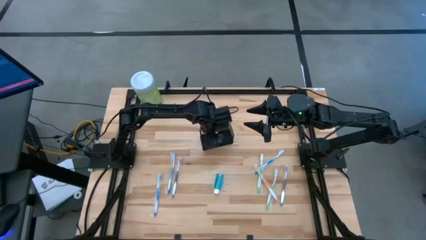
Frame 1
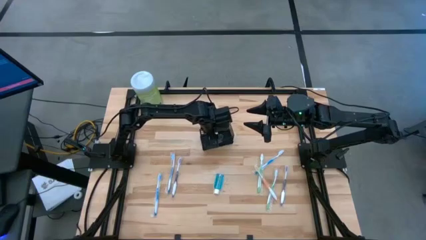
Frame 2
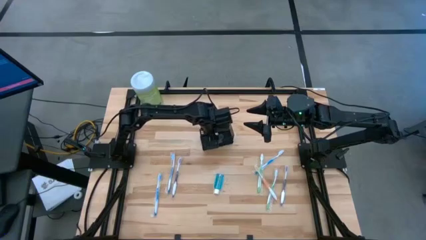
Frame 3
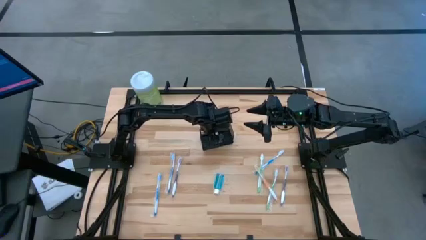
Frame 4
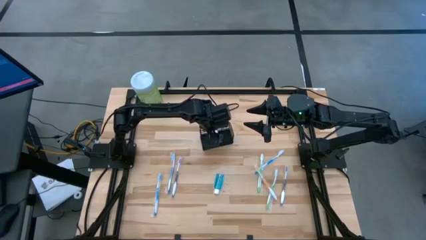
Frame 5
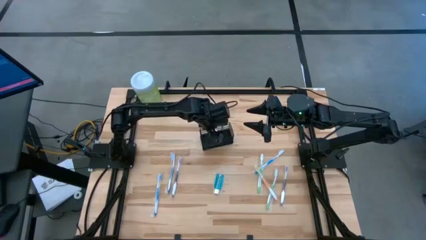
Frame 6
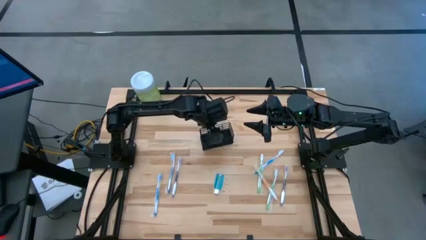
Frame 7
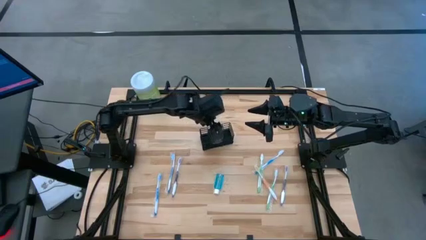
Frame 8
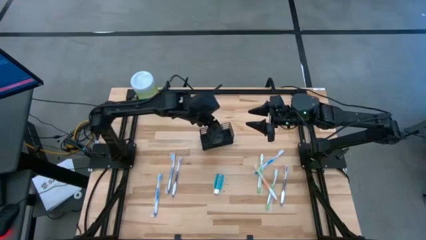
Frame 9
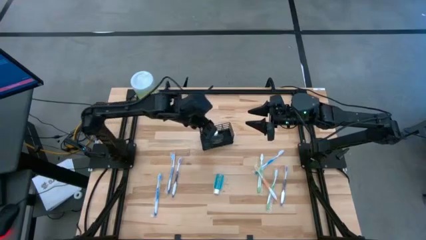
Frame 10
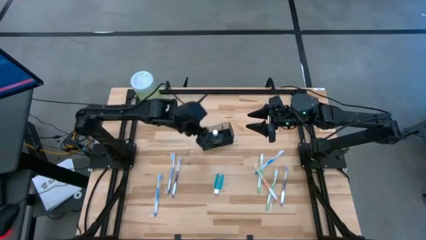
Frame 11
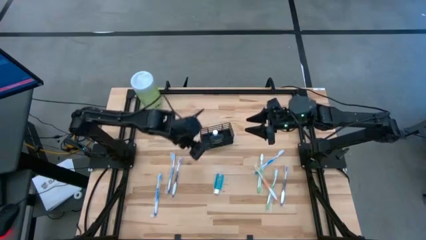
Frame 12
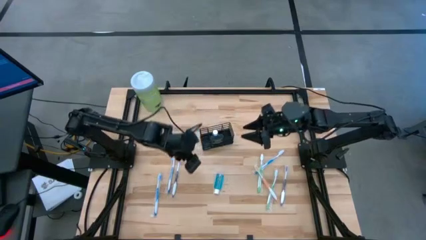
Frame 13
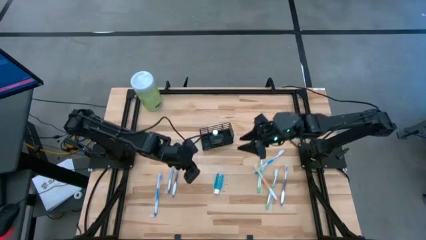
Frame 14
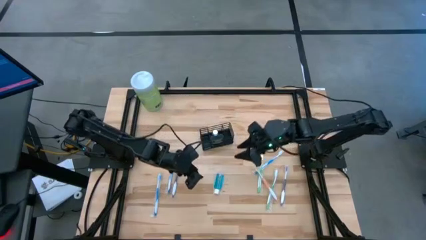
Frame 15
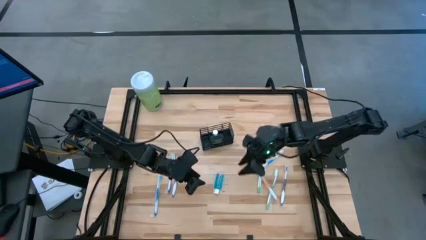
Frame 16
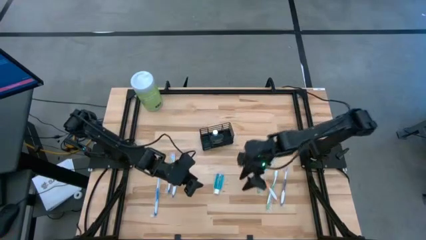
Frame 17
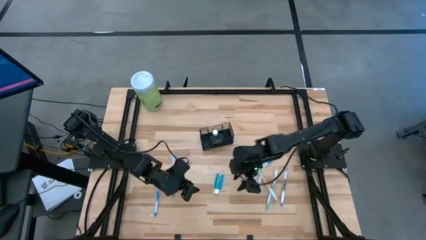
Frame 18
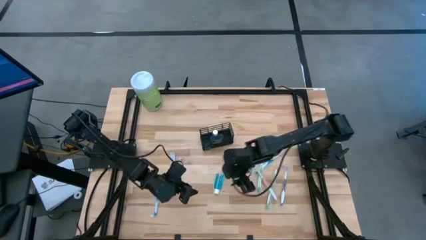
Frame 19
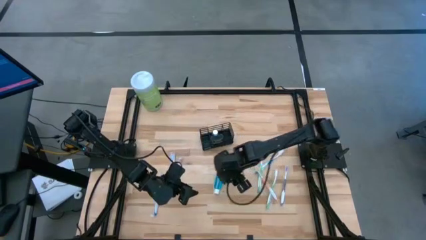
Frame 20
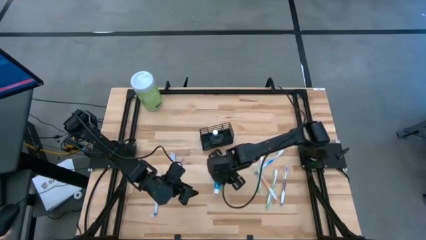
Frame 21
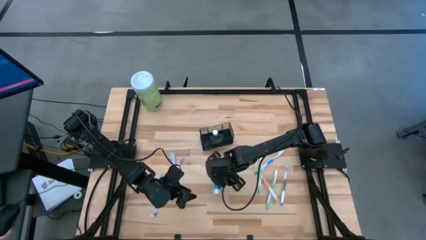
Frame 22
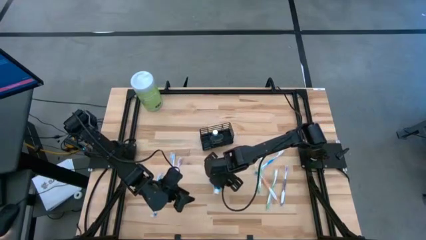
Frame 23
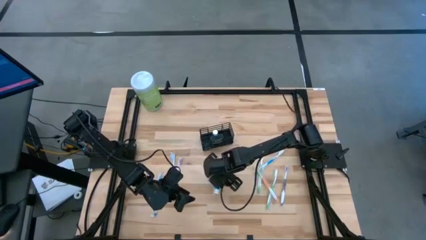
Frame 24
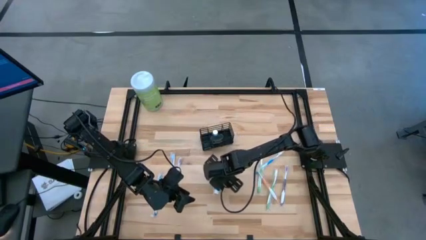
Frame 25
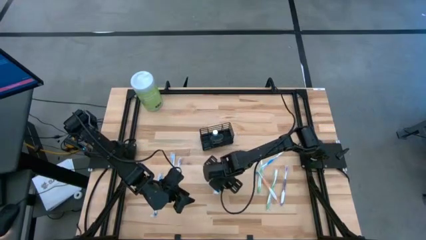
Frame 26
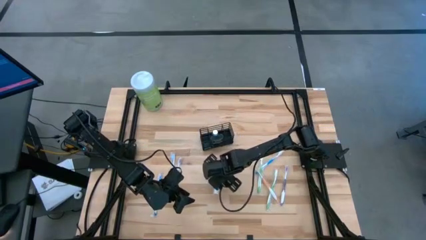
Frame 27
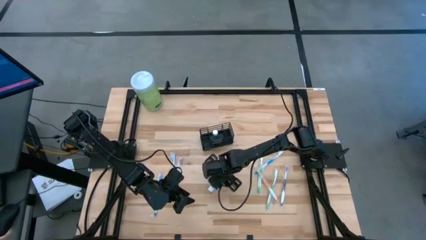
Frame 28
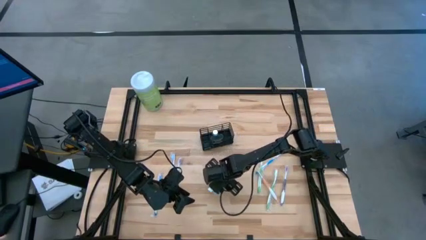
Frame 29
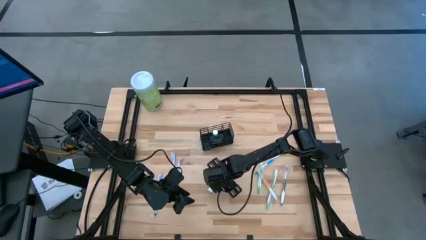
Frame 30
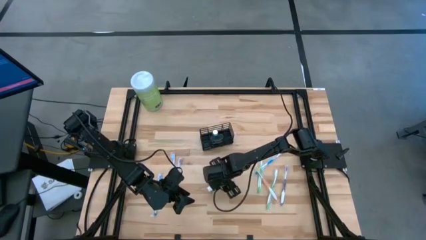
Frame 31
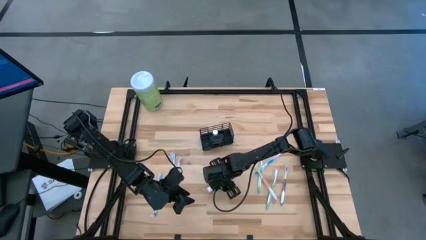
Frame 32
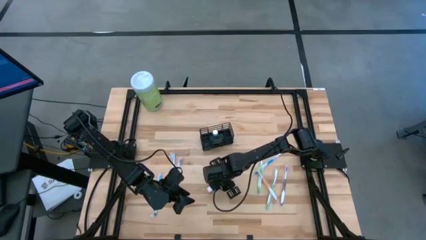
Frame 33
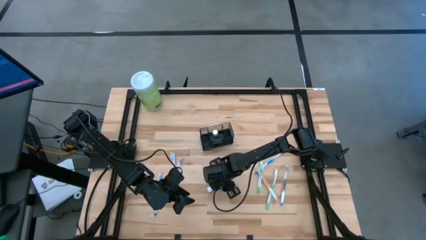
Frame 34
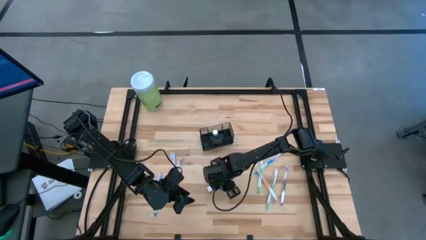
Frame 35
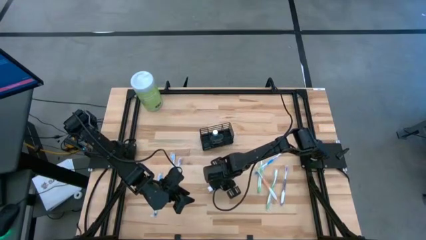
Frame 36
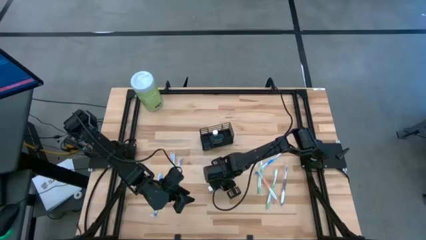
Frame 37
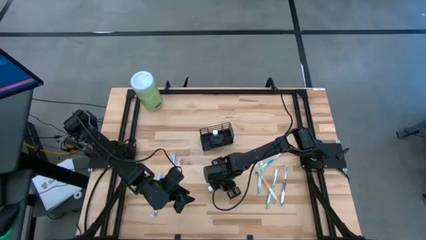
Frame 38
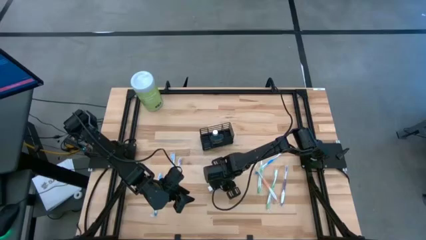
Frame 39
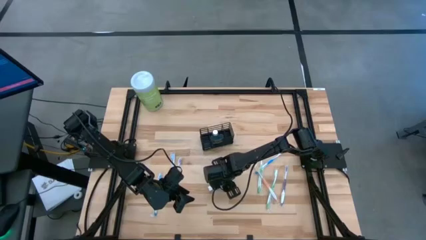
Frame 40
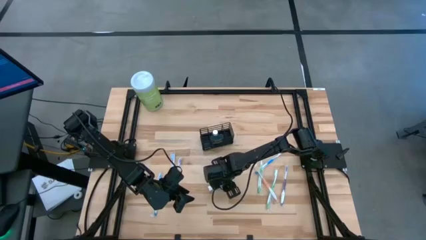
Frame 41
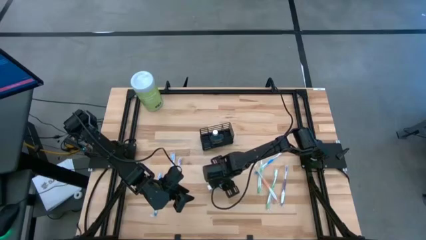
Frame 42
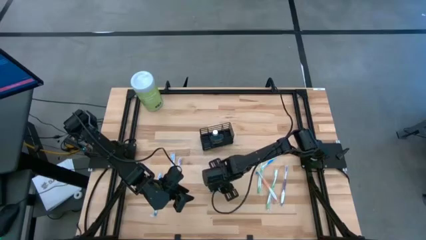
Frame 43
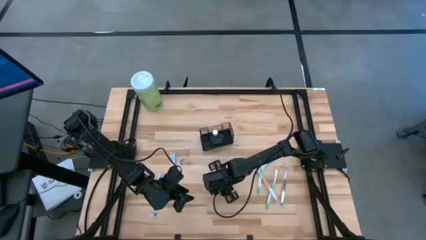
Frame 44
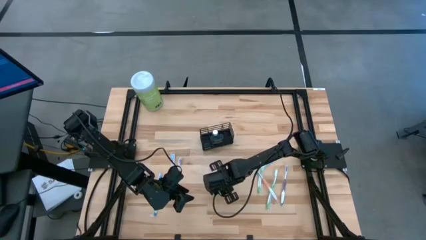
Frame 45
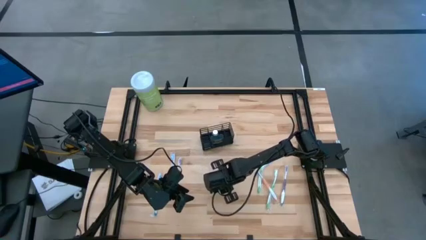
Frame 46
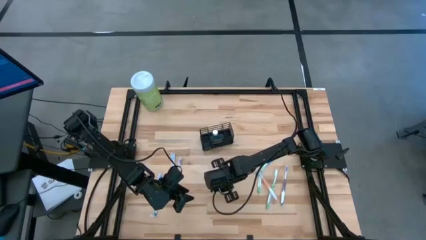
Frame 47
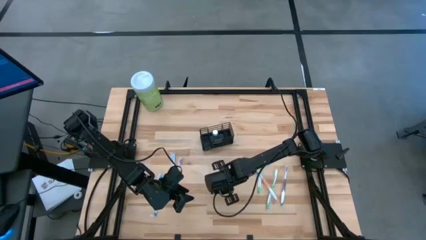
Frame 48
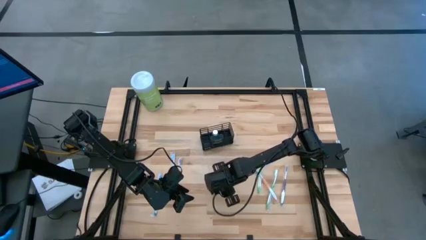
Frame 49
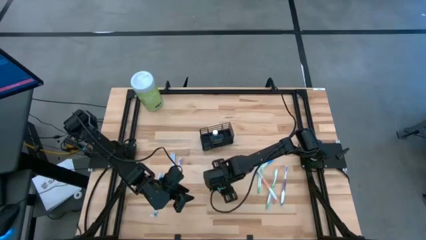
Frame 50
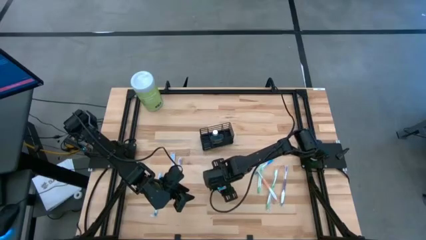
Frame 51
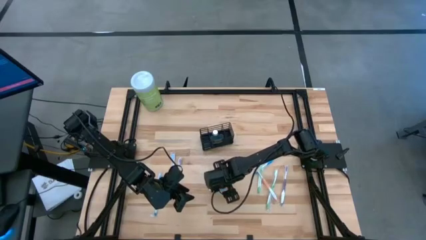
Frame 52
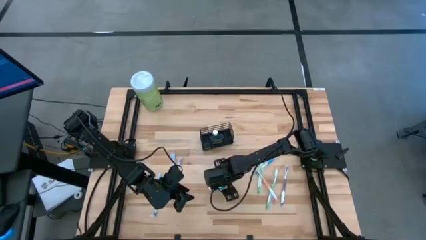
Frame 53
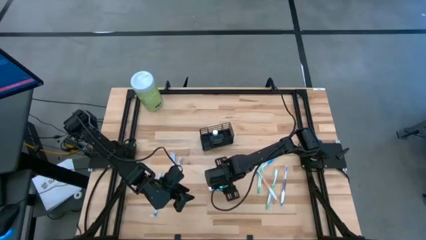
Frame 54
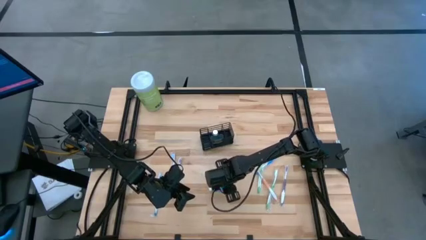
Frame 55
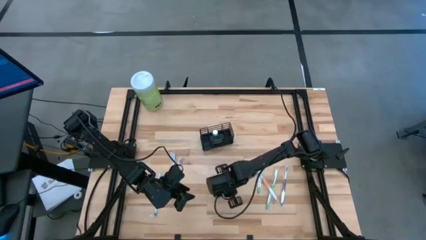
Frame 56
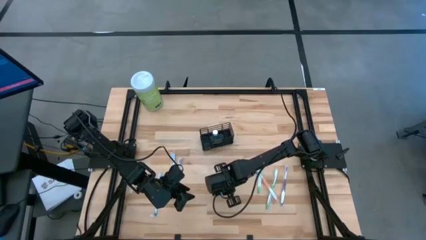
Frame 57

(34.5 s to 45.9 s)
Task: Pick & Place toothbrushing station
Put the blue mouthwash into the black mesh organizer
